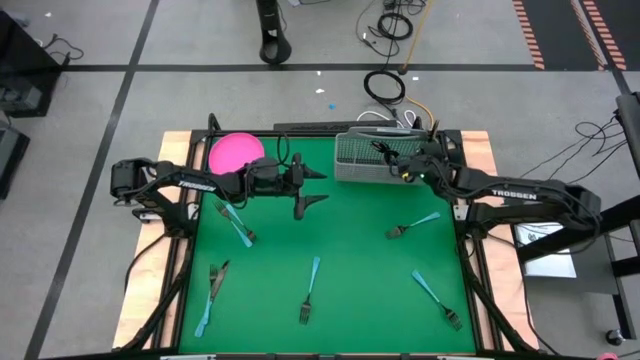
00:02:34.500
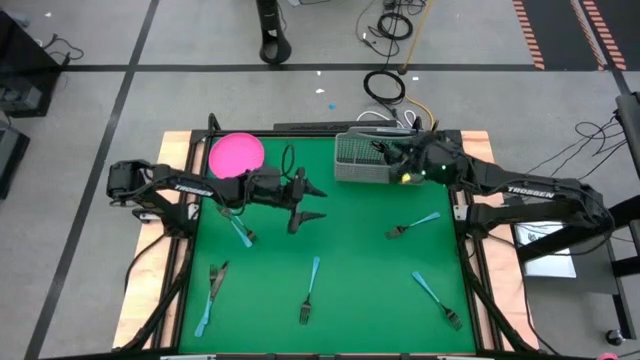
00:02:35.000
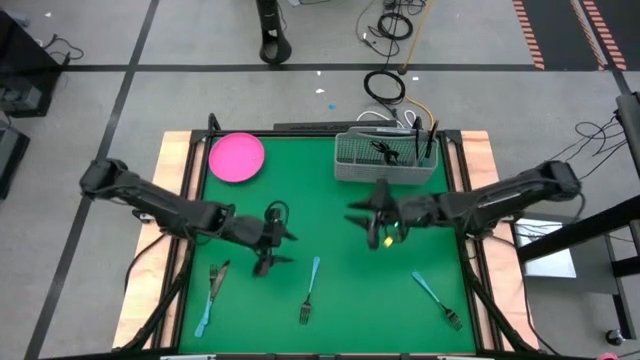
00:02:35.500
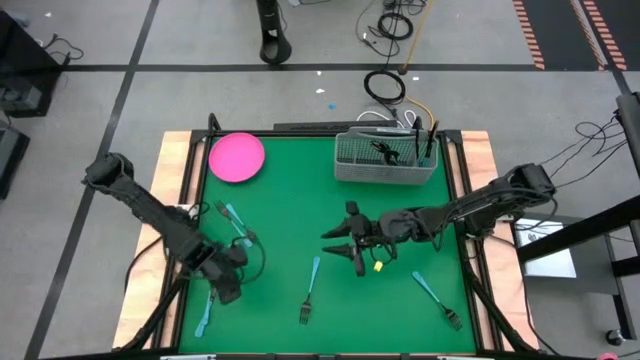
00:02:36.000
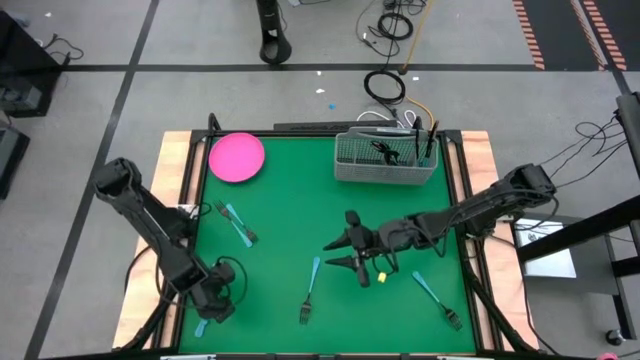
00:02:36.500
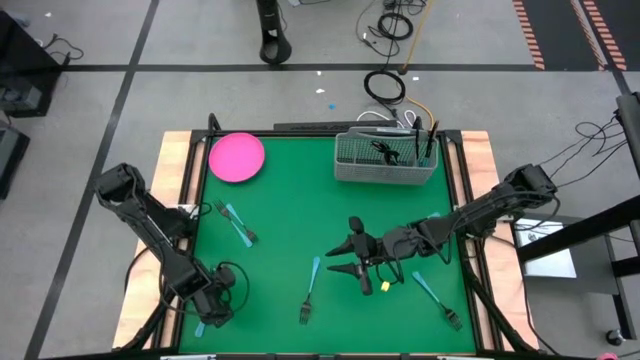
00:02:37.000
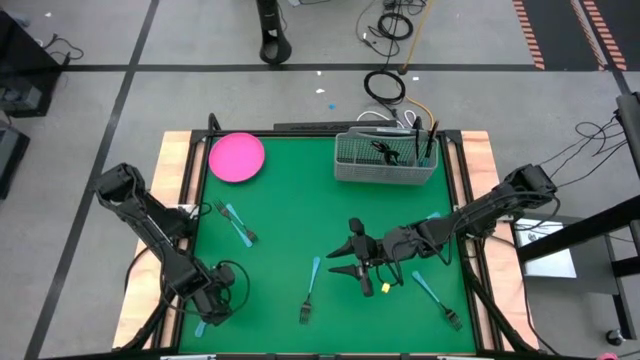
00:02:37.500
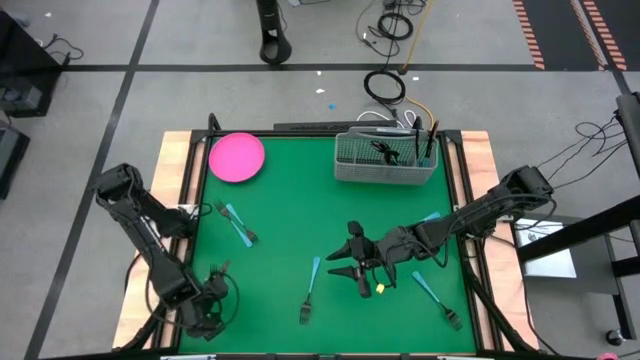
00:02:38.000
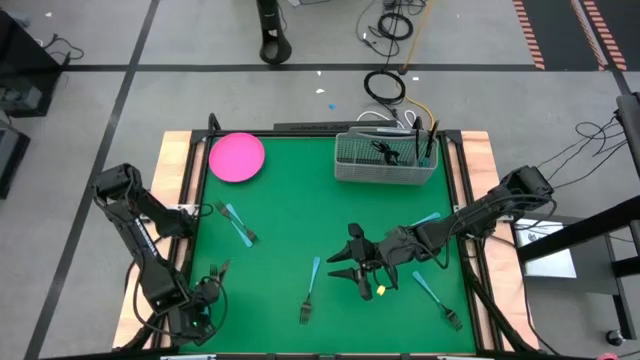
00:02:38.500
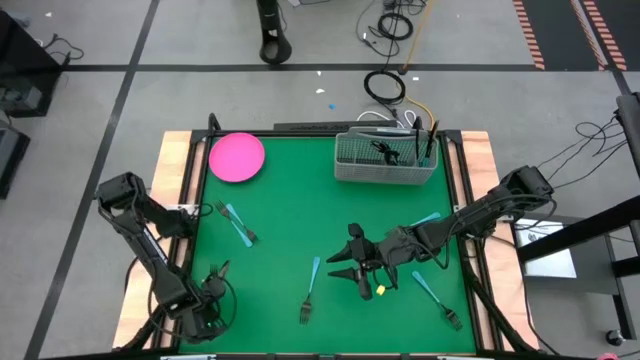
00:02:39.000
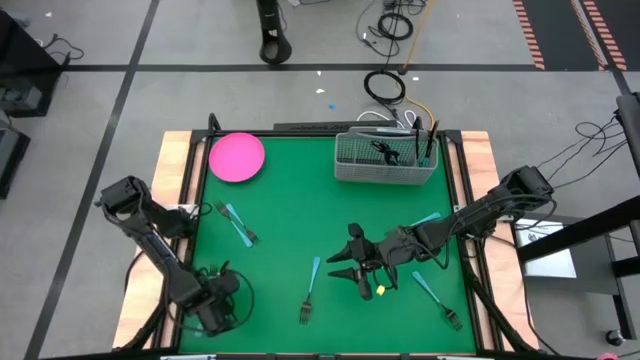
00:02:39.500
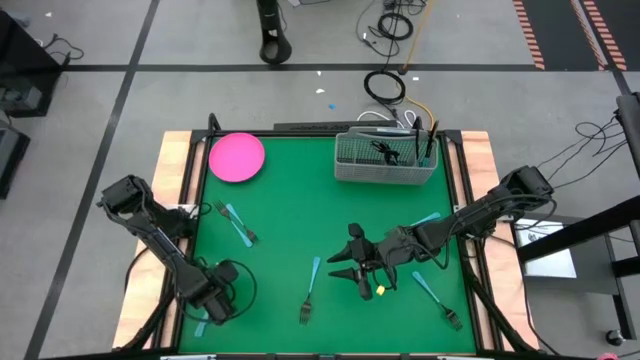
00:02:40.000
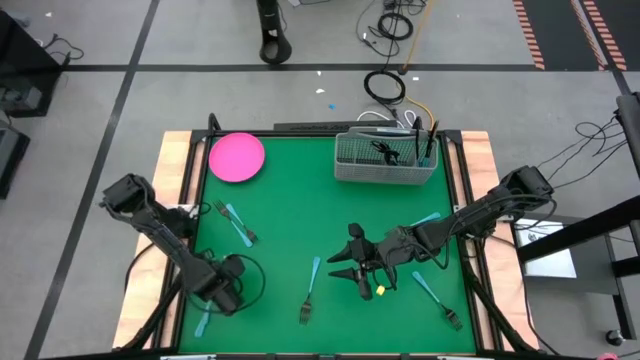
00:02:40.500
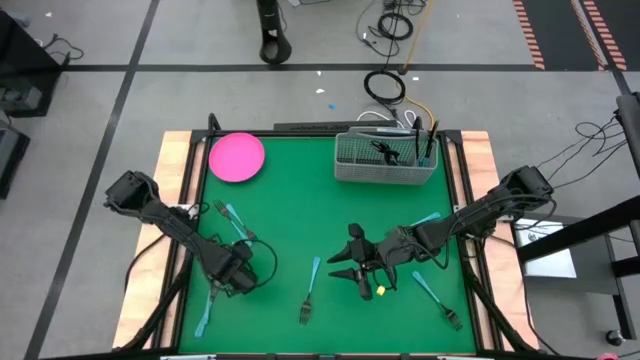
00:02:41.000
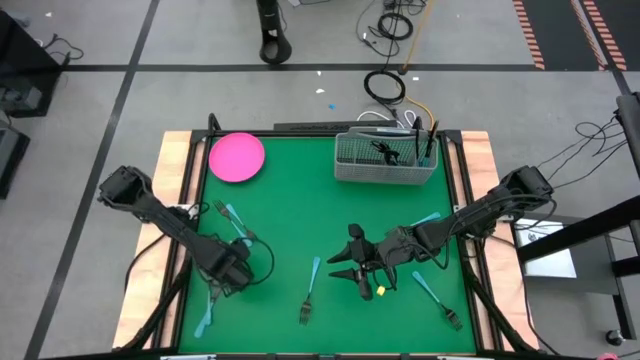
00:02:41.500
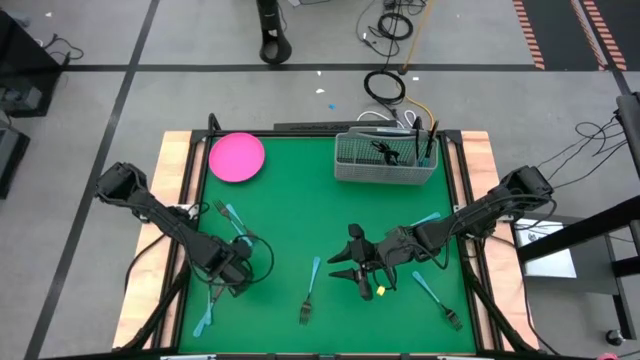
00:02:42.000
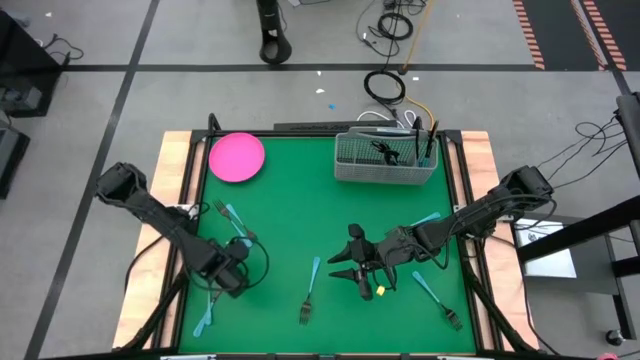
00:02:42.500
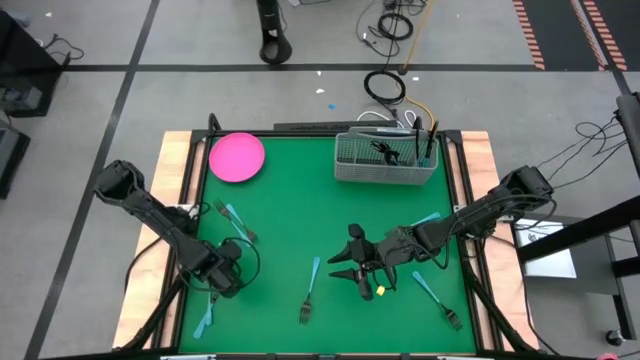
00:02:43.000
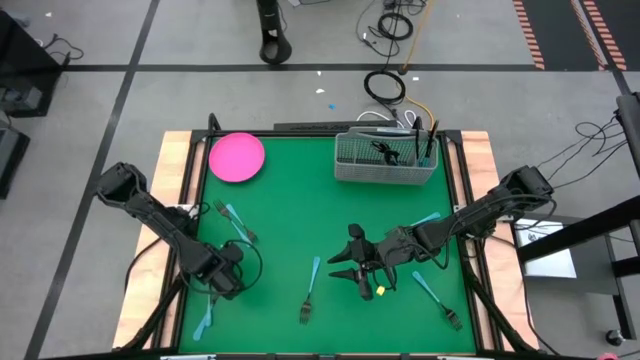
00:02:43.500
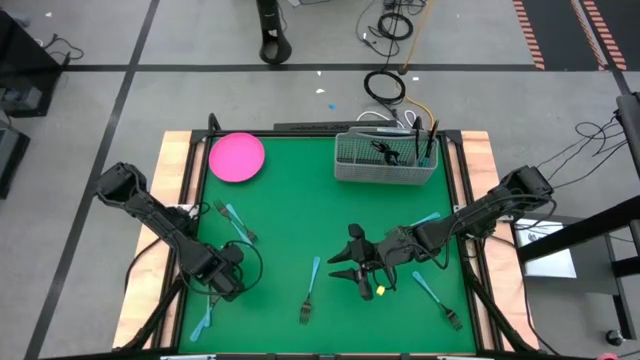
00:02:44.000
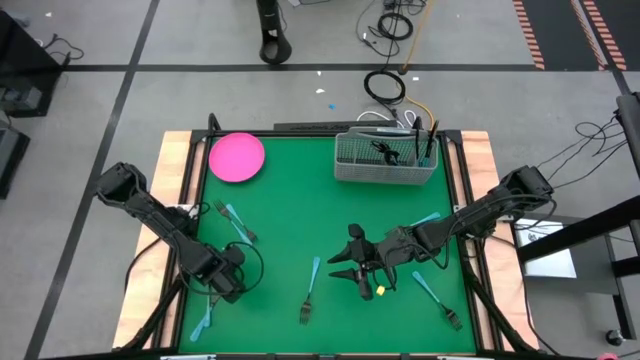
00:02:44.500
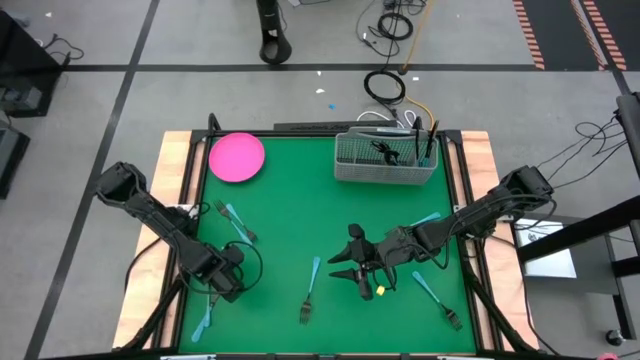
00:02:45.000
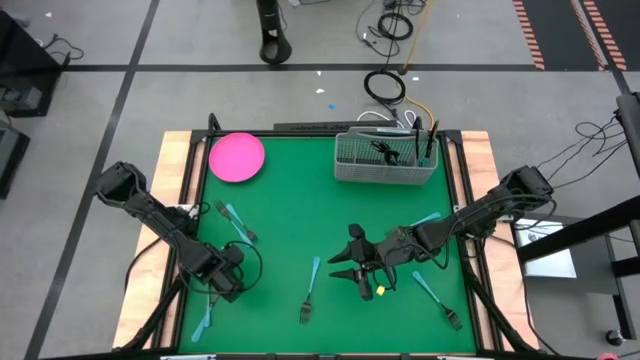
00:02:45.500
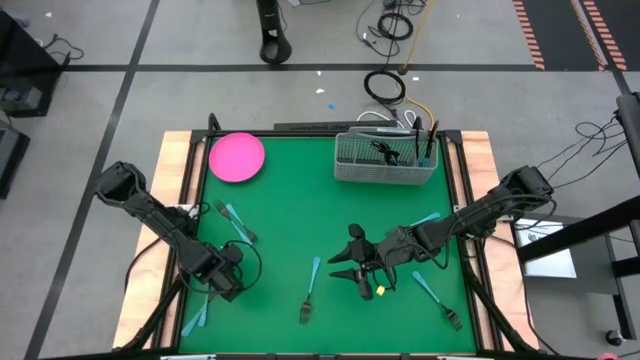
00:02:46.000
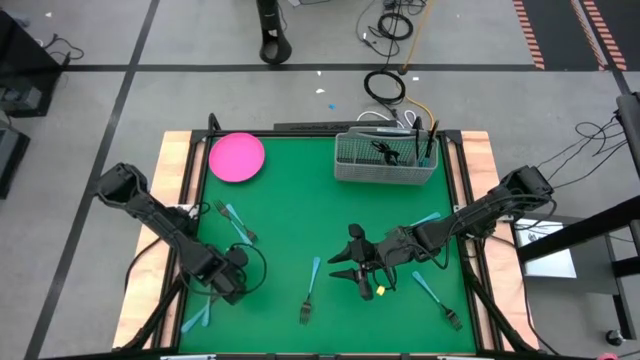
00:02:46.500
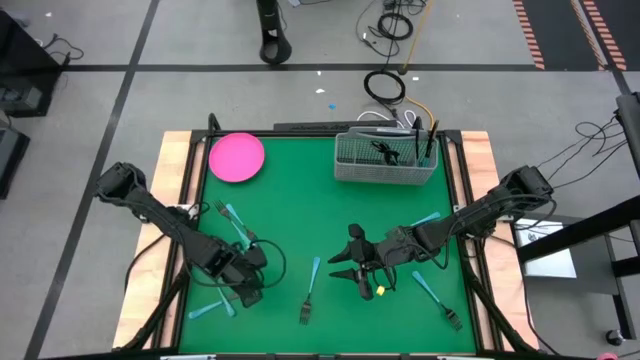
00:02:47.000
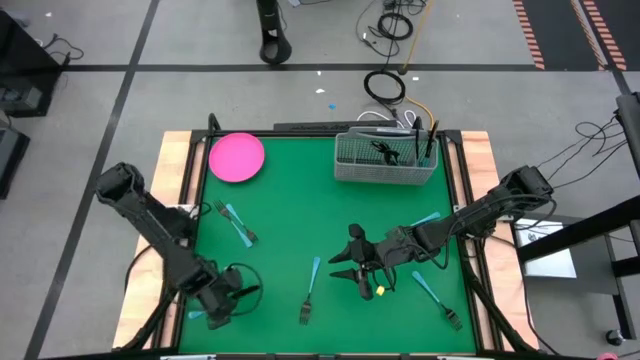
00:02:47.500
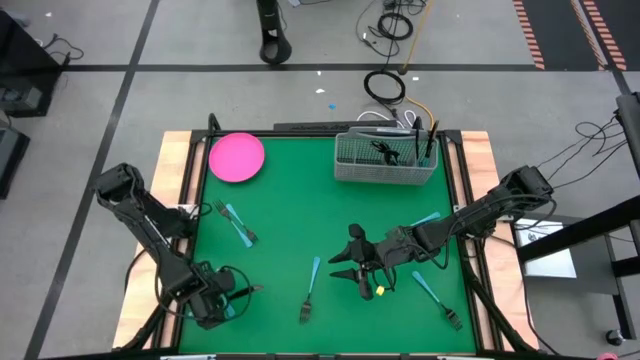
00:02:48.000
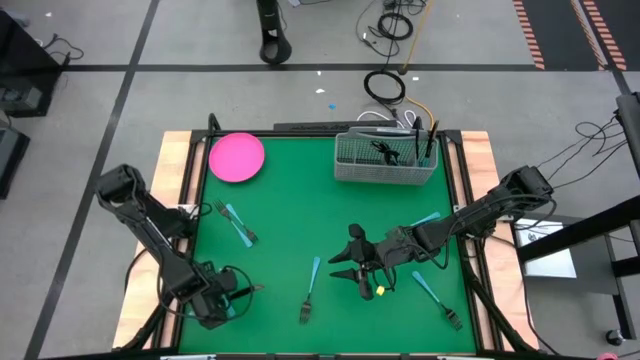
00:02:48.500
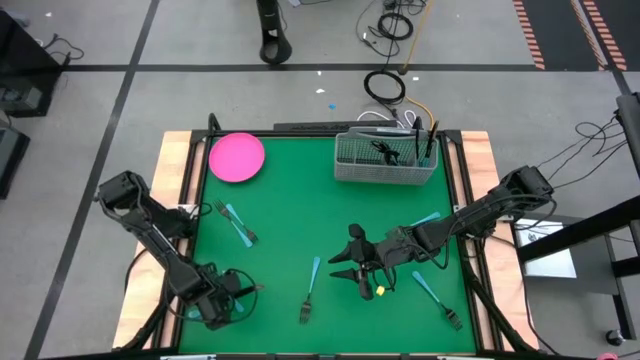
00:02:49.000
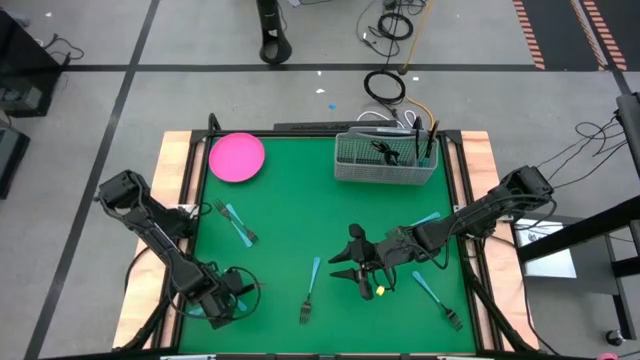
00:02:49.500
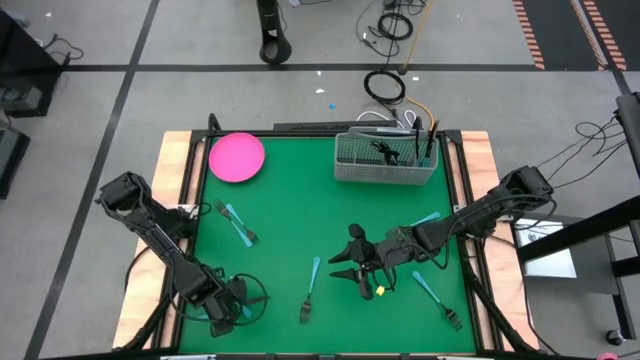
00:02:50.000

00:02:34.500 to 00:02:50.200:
Task: Sort silverware
Put the black knife into the cutlery rack with the other black knives

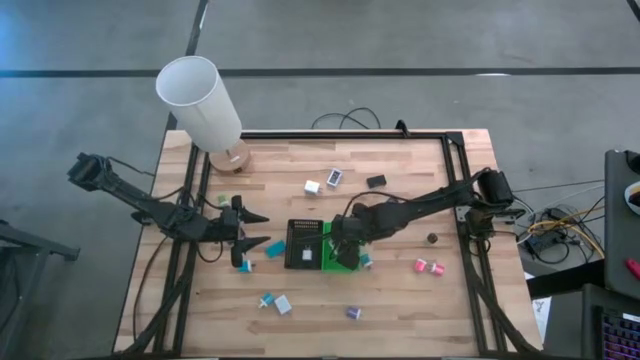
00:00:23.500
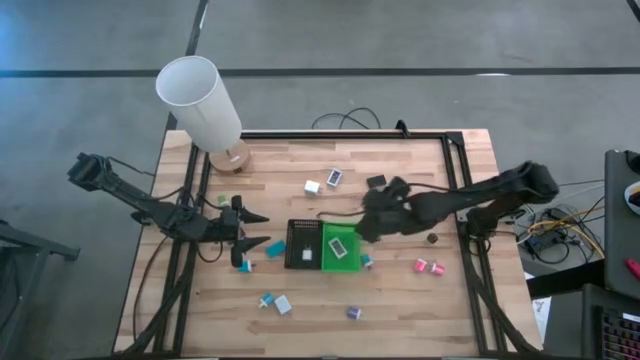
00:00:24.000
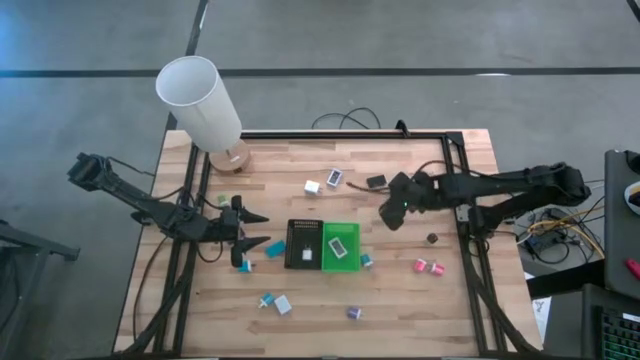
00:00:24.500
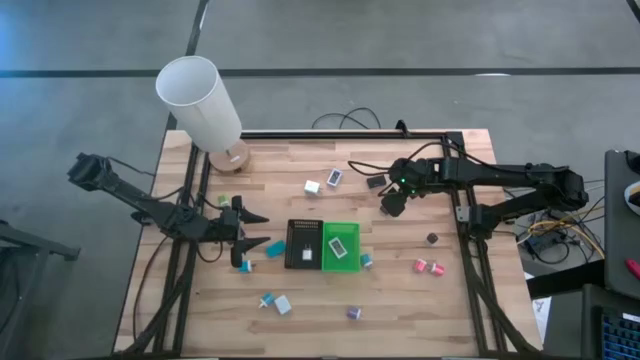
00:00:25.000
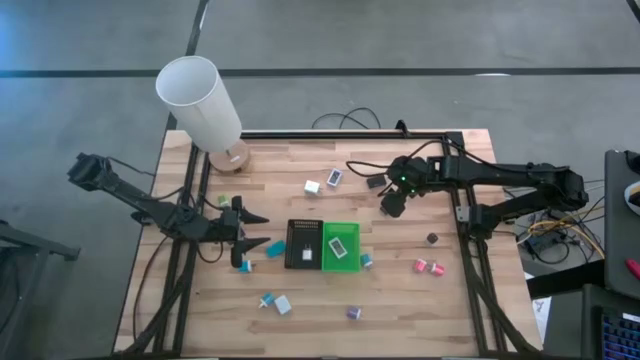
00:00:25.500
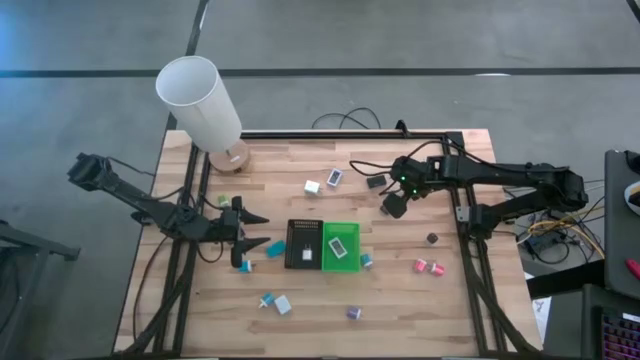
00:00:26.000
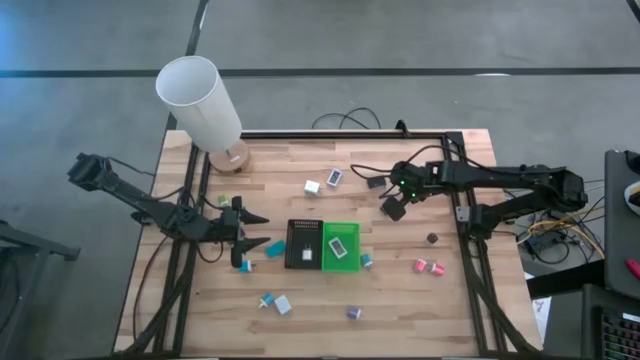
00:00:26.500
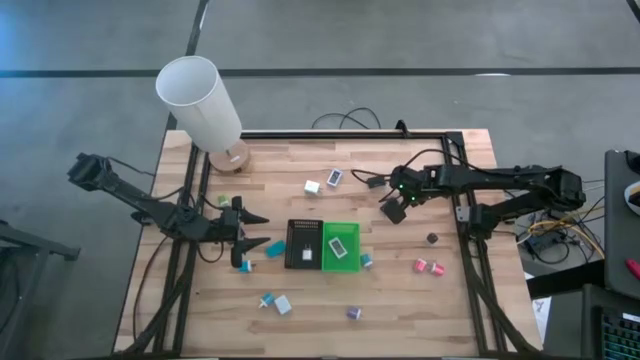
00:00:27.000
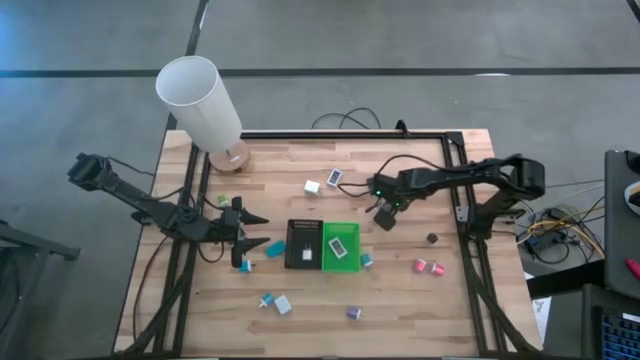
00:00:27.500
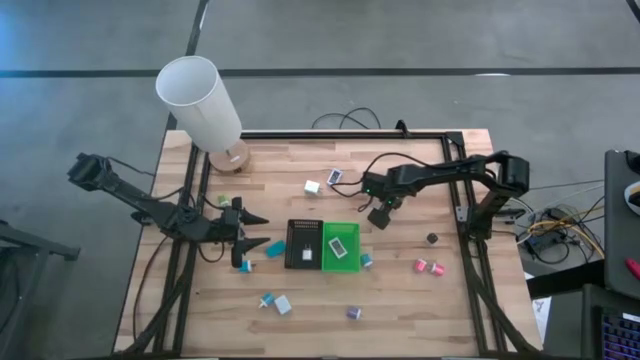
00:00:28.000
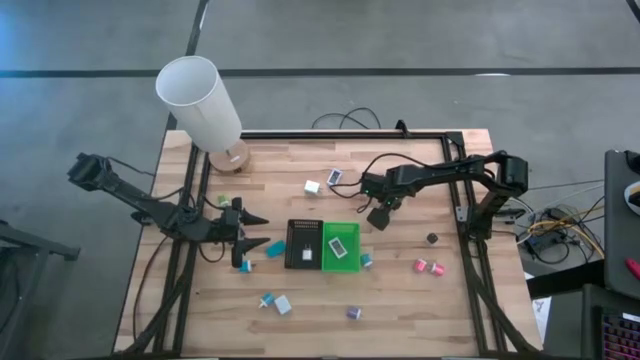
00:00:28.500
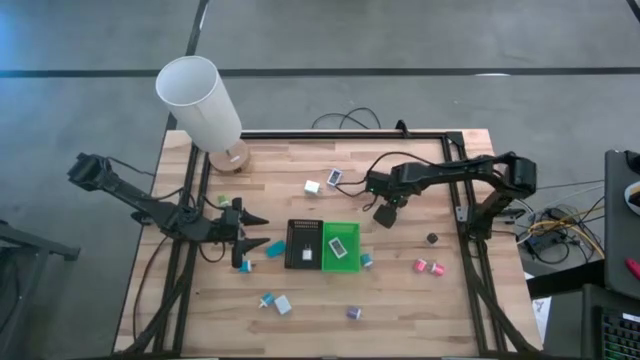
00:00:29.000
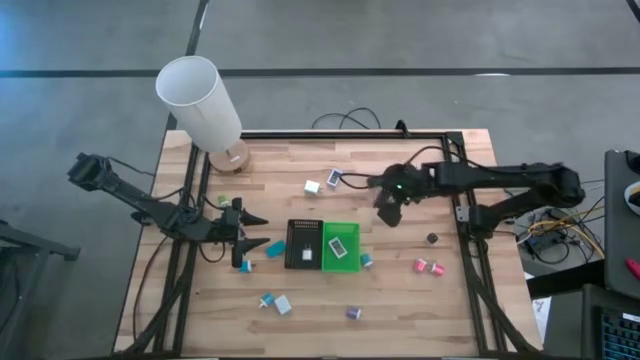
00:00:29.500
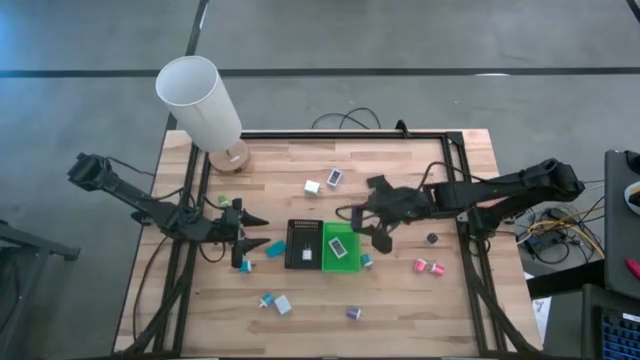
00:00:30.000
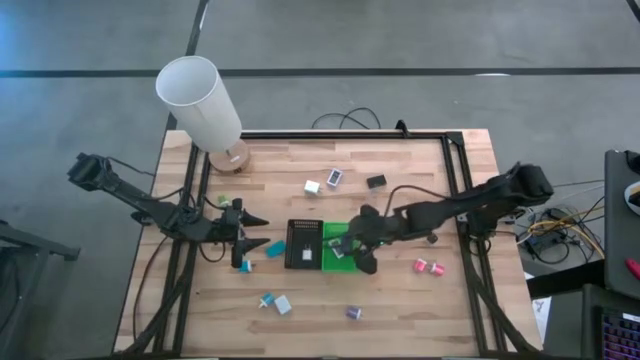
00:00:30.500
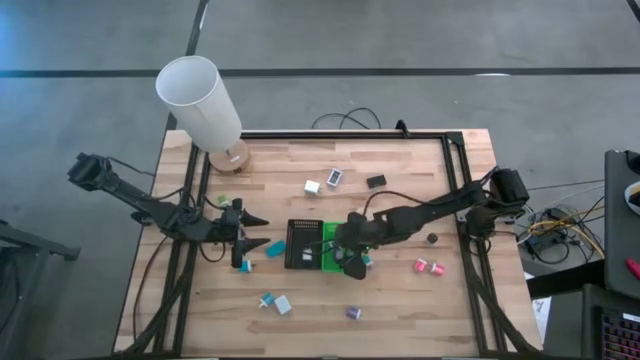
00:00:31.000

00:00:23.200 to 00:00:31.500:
Task: Pick & Place Office items
Put the dark blue timer into the green bin
